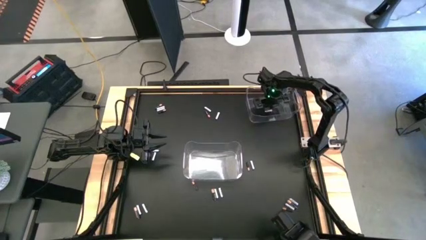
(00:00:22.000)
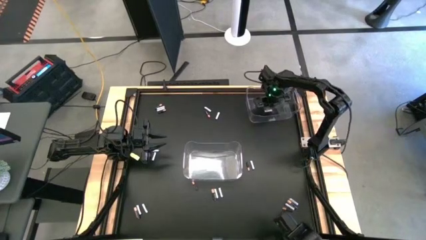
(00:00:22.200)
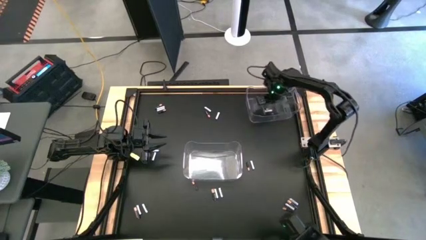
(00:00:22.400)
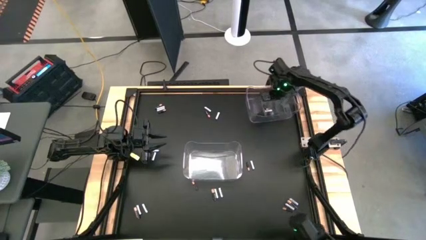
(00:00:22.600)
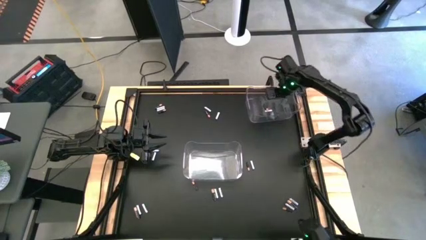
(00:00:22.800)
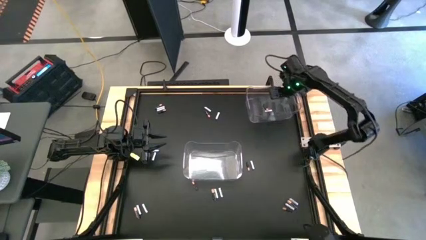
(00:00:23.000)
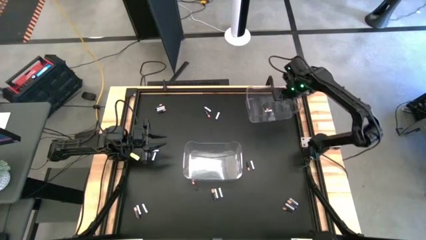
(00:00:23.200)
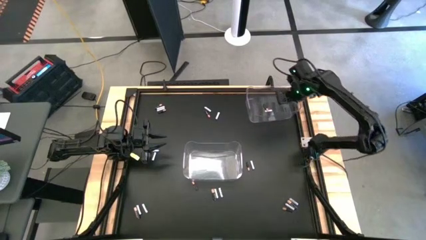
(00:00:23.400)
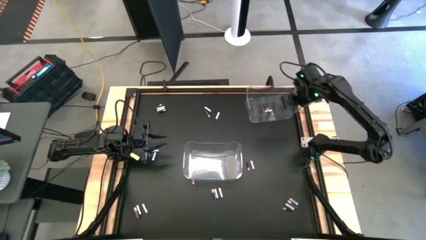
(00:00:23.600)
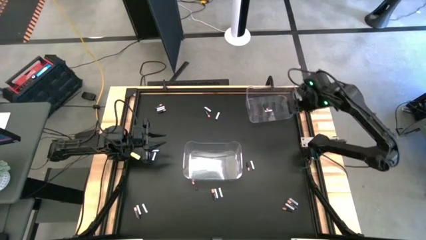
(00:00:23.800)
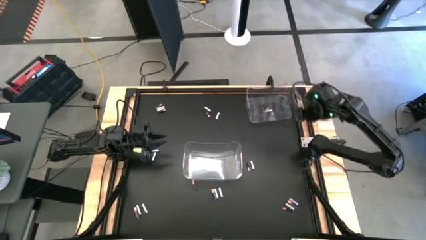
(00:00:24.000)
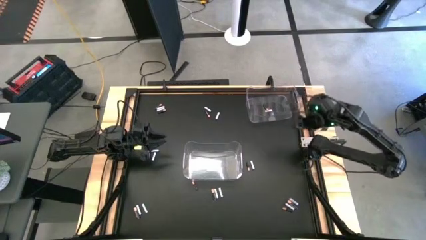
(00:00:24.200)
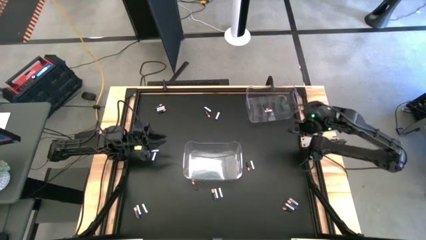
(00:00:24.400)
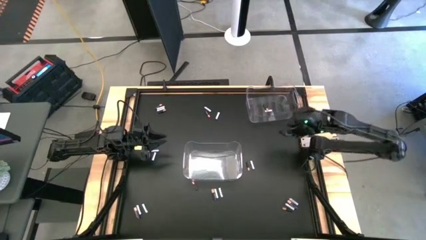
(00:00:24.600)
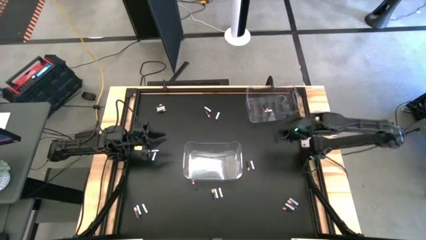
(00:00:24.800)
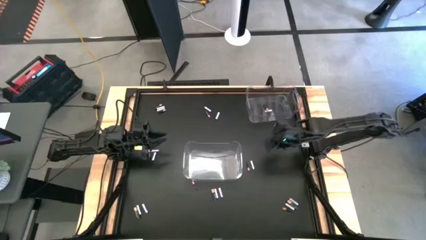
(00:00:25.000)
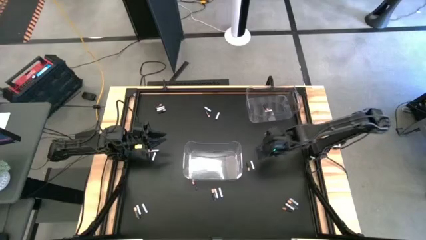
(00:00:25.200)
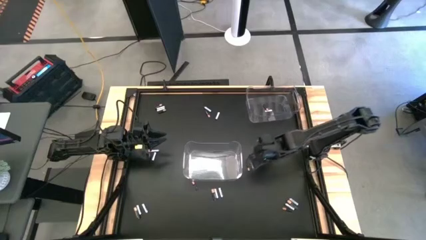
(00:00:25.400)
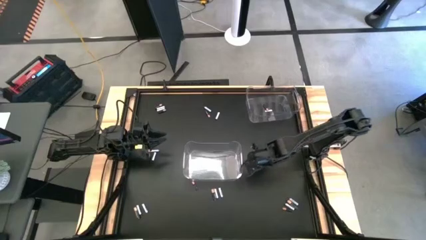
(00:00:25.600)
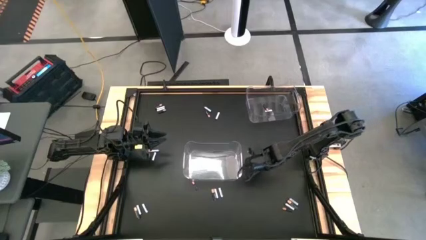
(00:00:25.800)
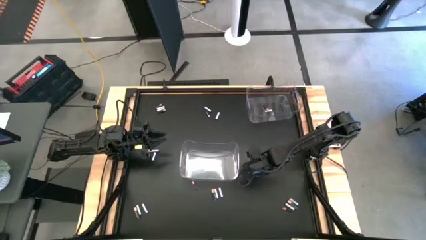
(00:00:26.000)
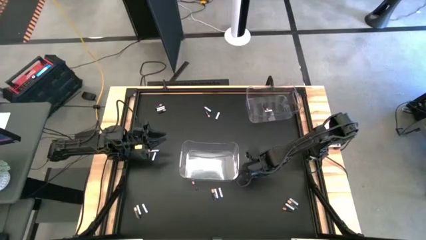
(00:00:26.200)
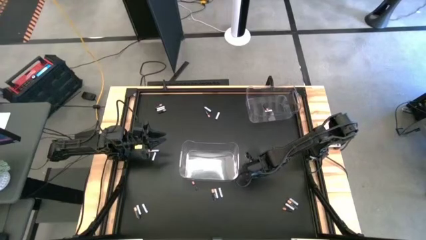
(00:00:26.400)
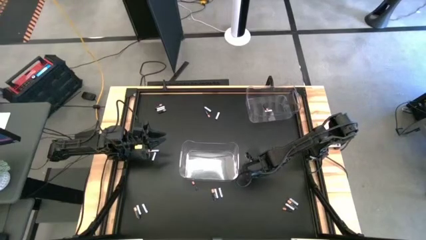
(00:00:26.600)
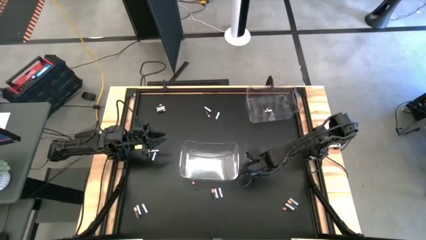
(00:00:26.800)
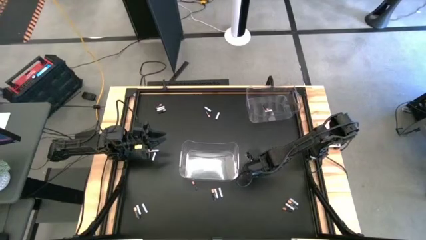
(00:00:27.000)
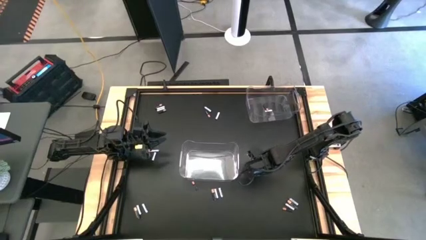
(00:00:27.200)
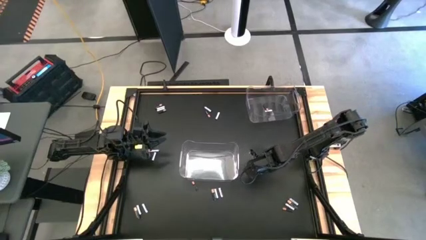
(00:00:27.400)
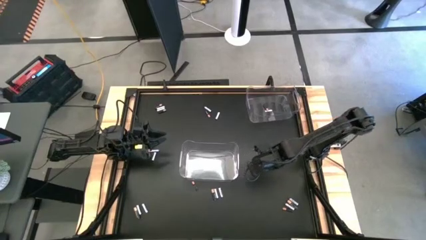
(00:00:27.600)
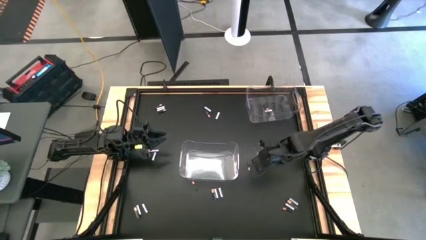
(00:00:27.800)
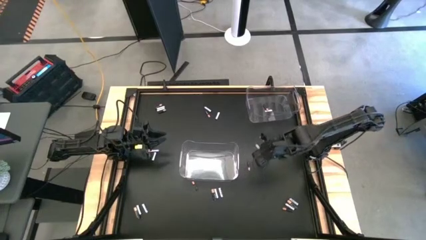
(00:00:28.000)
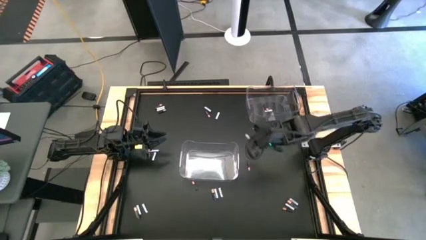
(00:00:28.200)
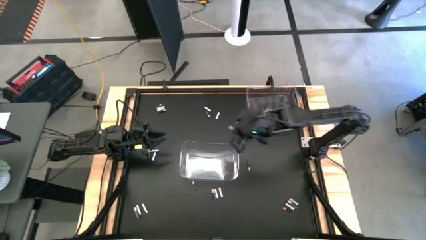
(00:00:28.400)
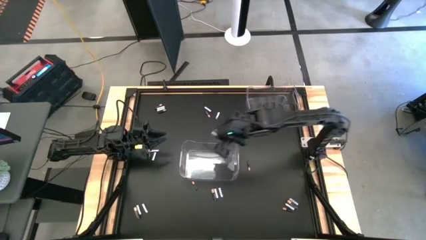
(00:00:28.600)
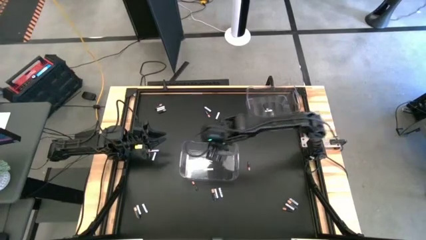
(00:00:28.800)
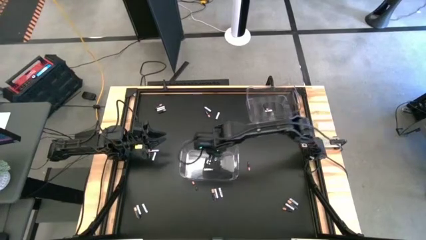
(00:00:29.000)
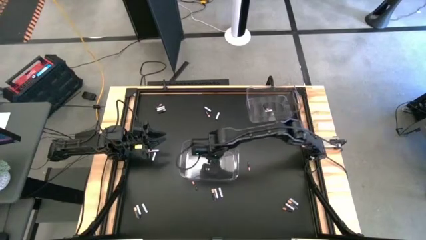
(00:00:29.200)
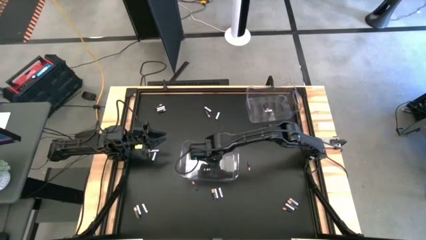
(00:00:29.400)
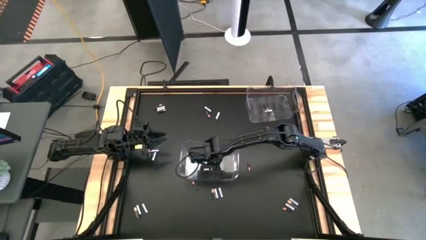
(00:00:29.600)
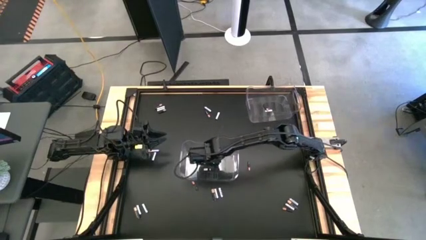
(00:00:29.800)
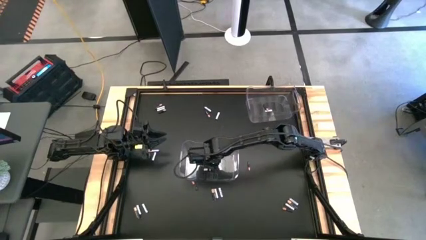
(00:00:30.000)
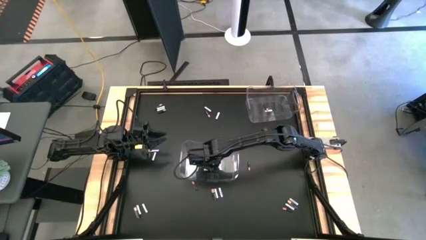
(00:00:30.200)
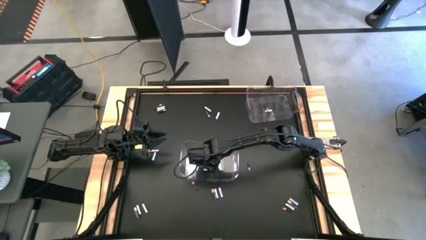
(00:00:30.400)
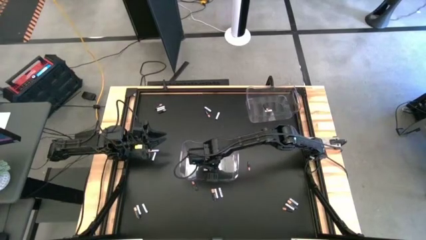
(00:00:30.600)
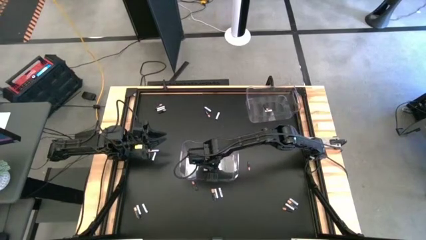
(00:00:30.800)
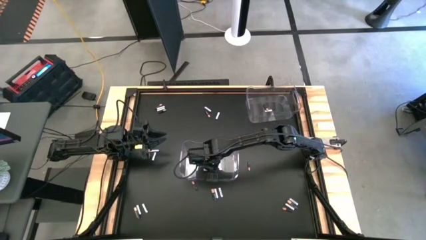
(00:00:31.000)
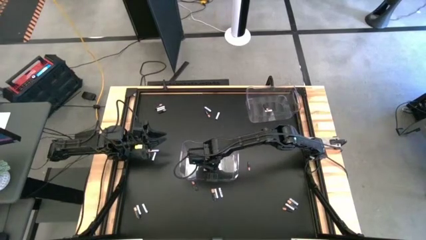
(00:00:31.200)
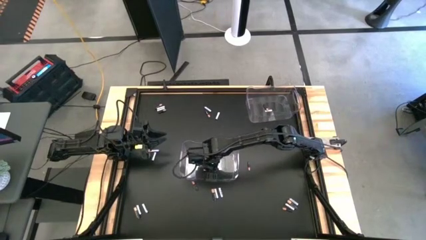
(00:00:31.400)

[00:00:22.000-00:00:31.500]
Task: Sort batteries
Put the white battery into the bottom transparent bin

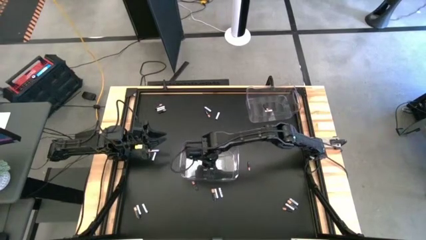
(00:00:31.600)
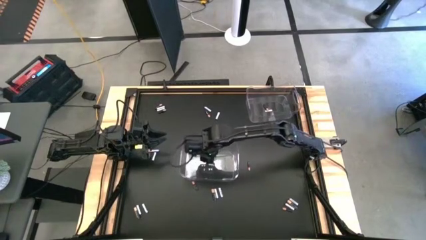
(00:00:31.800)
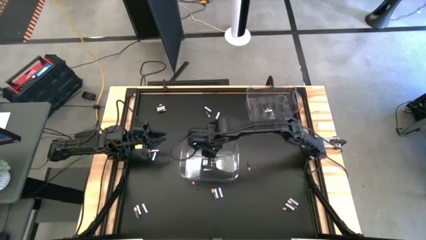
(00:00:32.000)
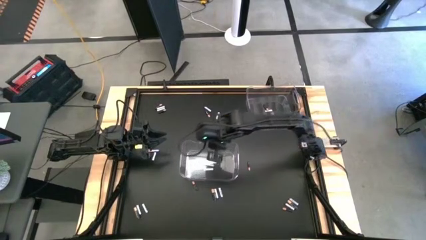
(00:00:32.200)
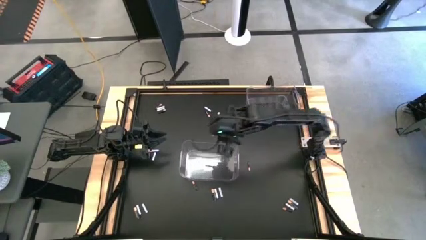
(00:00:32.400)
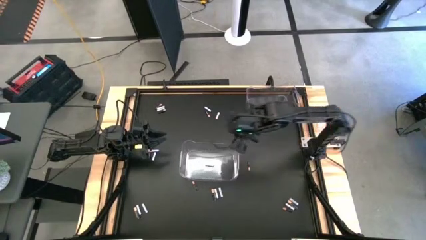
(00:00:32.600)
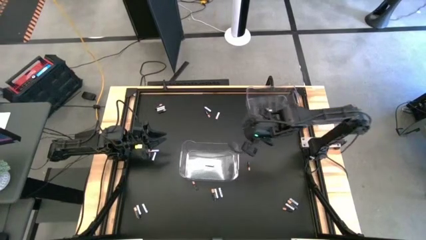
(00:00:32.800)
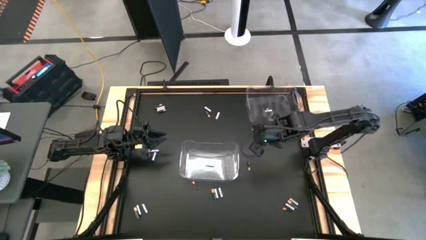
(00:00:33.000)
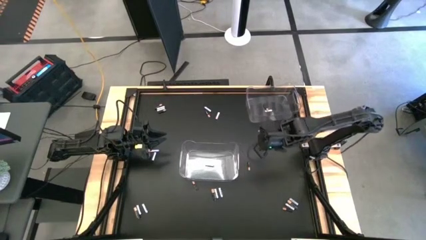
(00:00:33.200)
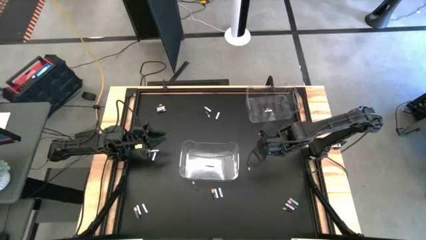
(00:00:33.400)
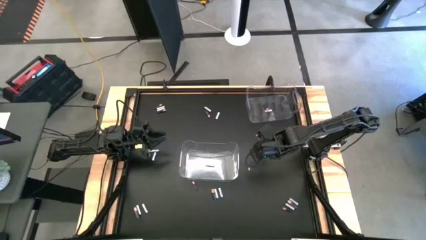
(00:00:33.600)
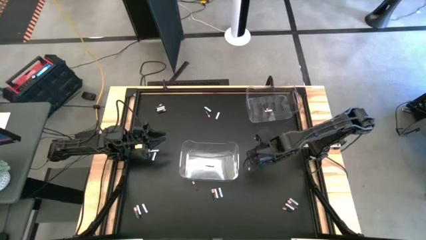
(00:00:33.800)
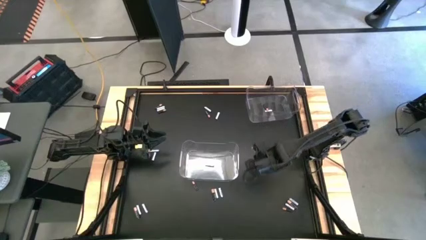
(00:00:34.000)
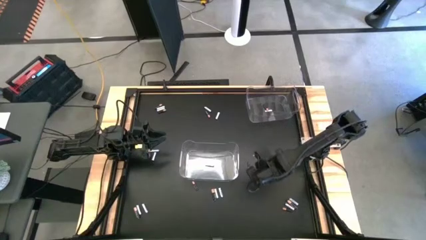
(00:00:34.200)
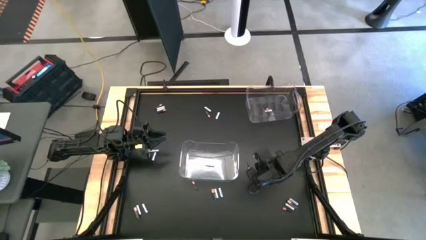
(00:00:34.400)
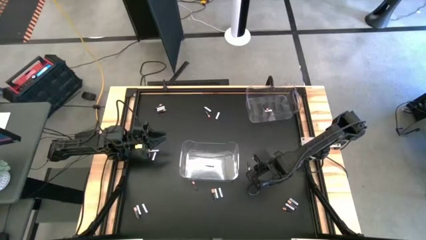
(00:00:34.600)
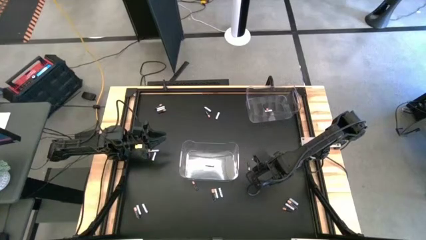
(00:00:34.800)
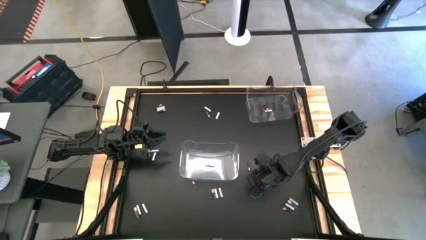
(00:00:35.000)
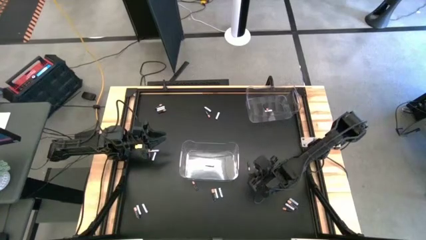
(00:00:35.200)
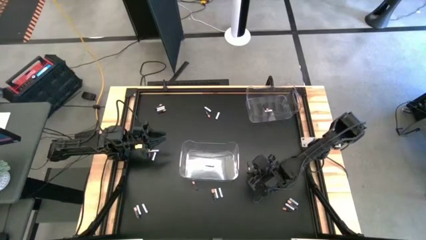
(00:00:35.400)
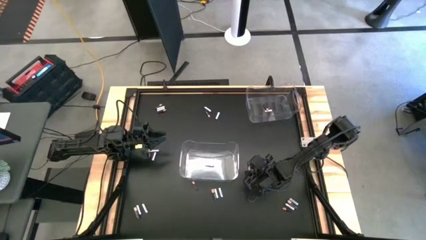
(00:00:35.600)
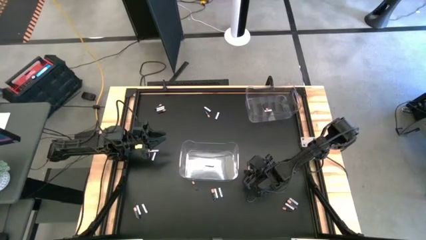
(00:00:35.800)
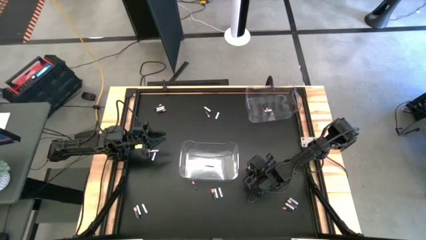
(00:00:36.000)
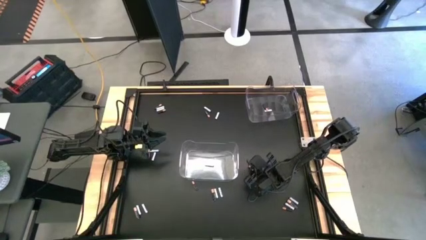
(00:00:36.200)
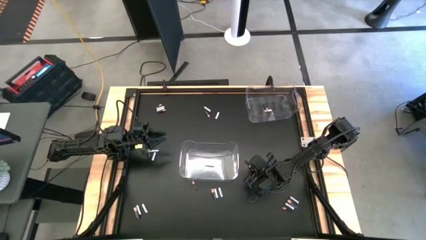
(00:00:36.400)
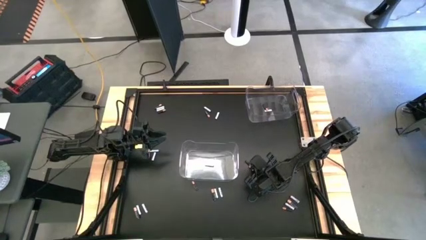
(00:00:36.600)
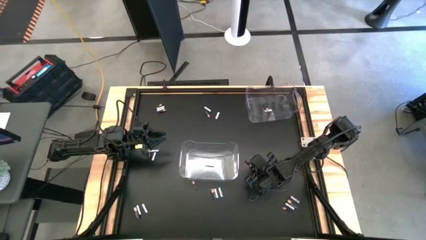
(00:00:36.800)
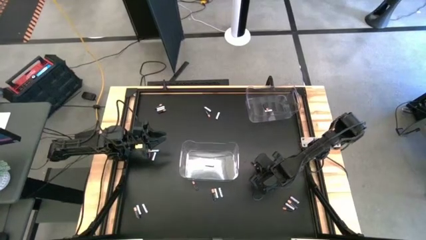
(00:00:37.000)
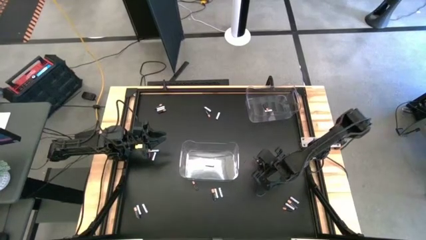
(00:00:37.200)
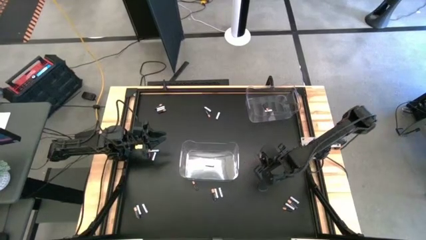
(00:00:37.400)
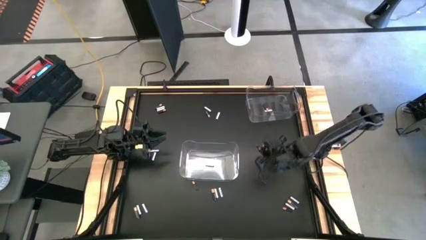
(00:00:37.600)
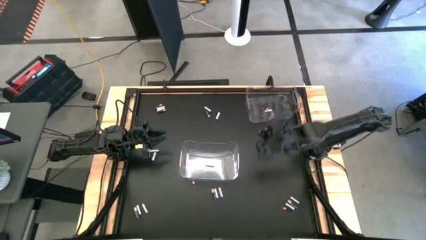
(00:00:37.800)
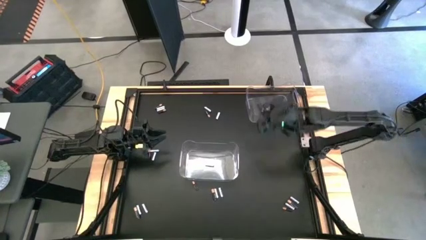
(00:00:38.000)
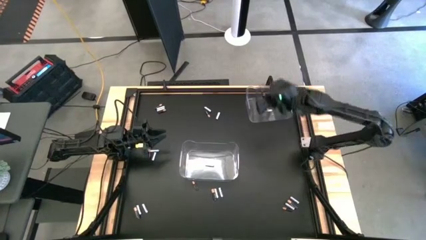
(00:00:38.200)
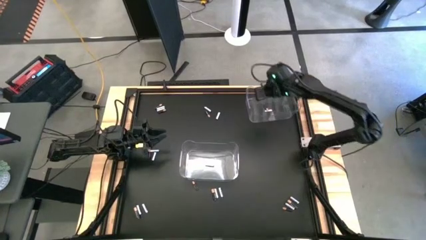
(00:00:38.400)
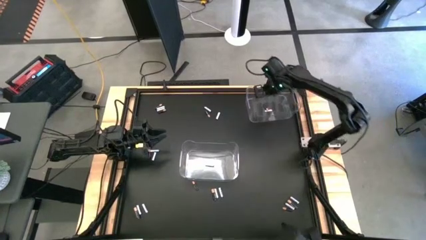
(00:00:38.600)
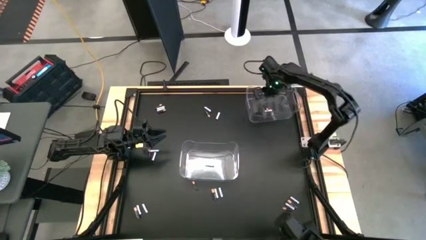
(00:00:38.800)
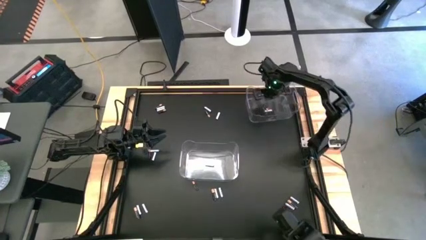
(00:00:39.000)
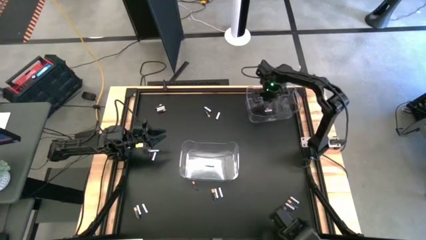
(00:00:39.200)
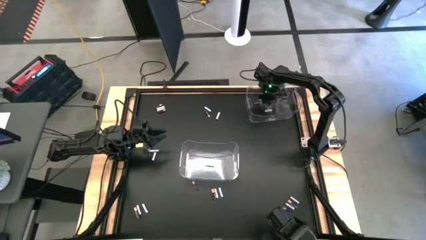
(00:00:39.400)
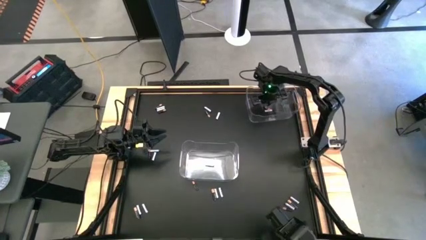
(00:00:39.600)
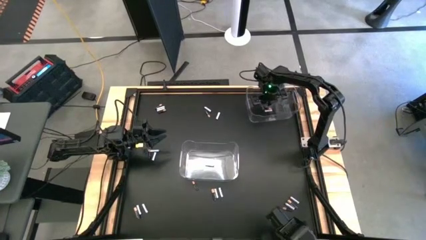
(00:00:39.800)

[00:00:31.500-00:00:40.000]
Put the black battery into the top transparent bin
